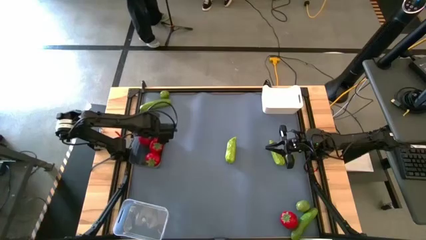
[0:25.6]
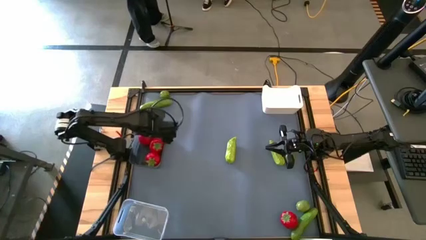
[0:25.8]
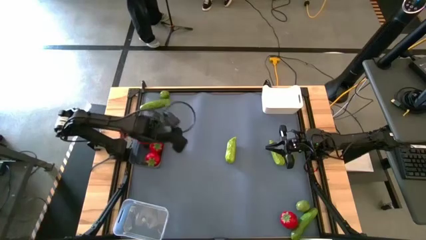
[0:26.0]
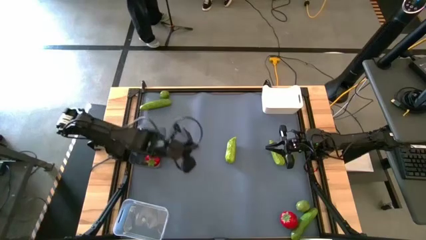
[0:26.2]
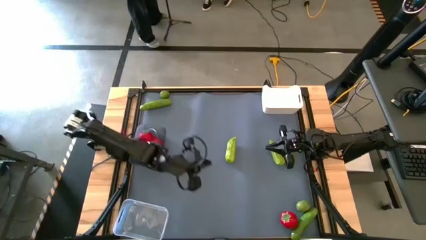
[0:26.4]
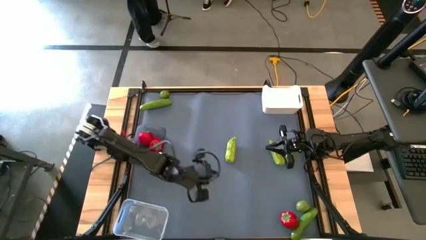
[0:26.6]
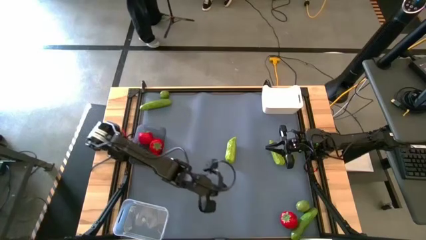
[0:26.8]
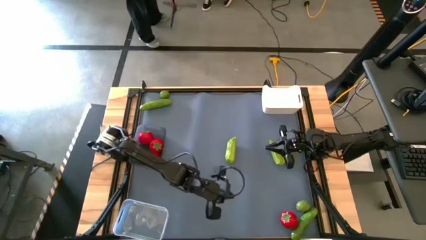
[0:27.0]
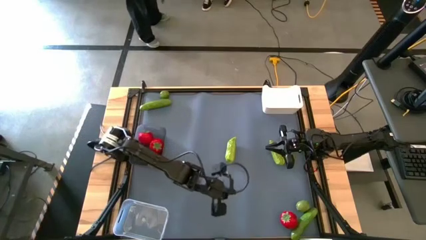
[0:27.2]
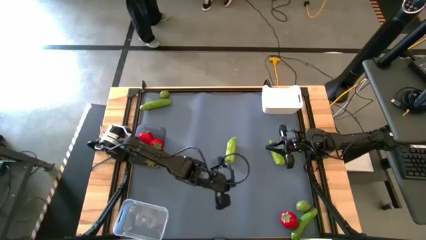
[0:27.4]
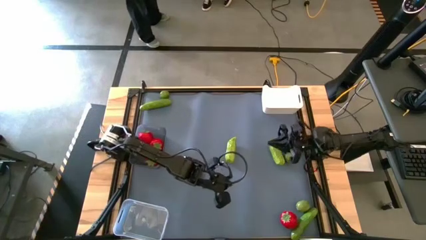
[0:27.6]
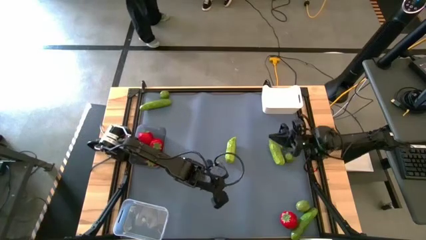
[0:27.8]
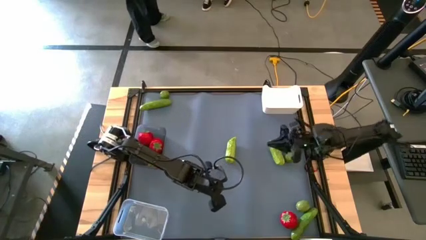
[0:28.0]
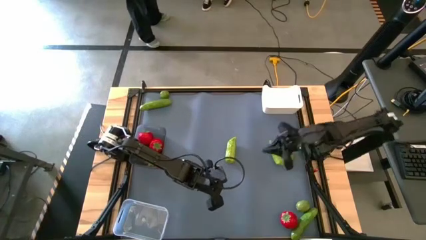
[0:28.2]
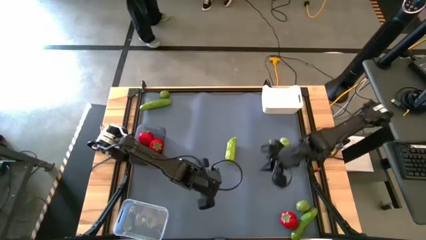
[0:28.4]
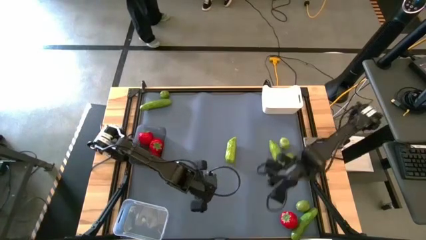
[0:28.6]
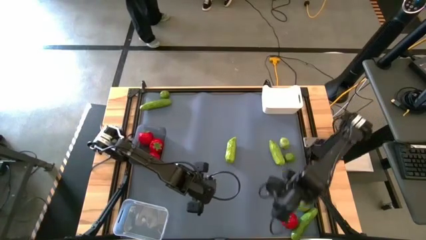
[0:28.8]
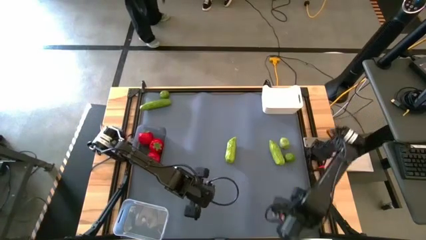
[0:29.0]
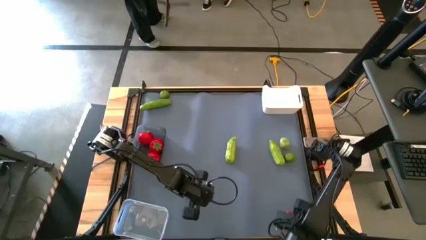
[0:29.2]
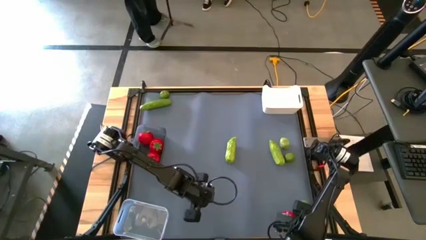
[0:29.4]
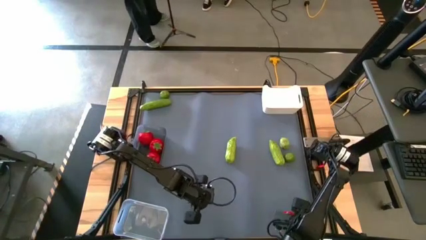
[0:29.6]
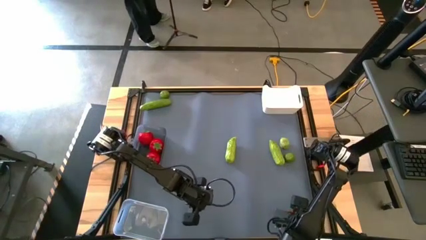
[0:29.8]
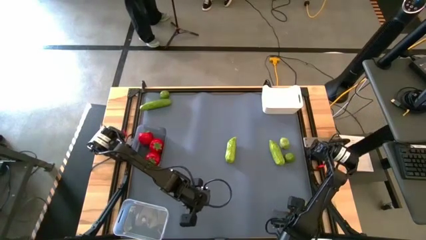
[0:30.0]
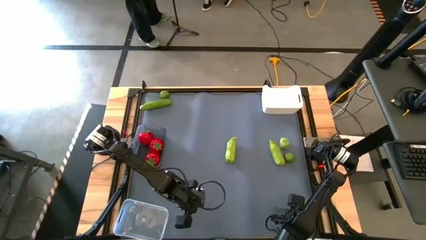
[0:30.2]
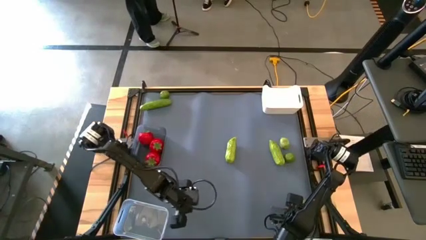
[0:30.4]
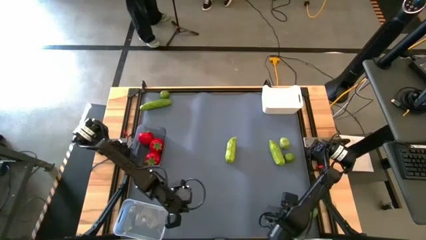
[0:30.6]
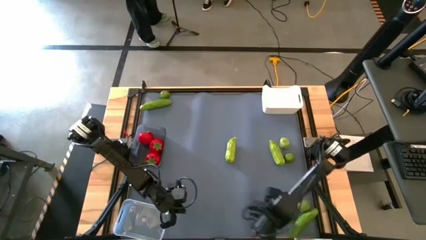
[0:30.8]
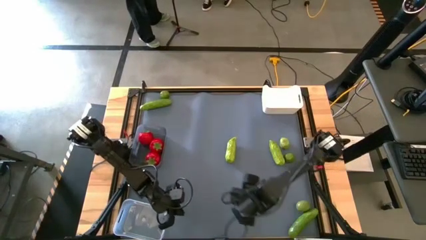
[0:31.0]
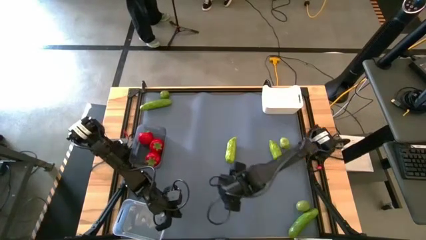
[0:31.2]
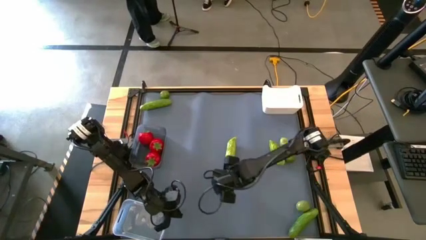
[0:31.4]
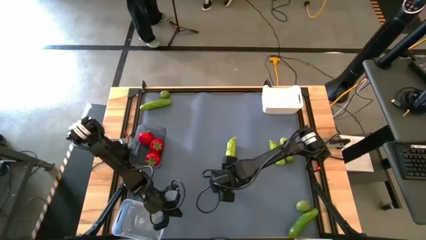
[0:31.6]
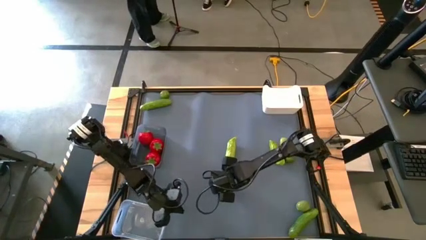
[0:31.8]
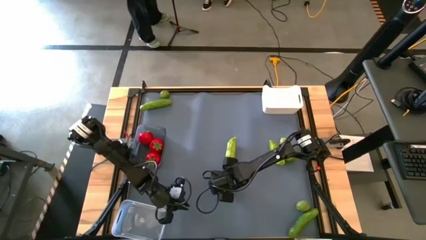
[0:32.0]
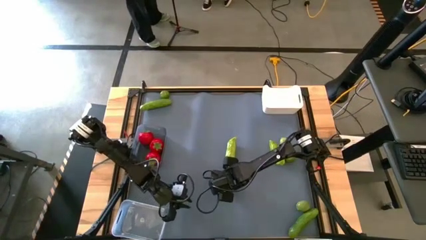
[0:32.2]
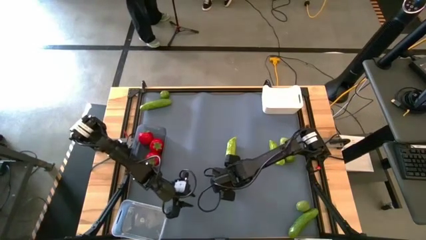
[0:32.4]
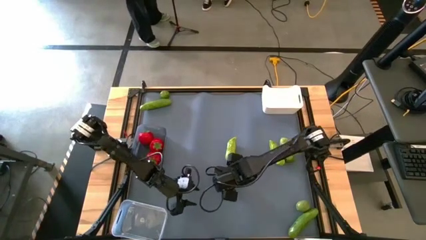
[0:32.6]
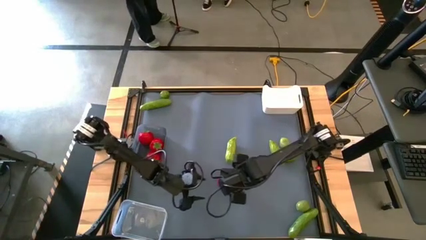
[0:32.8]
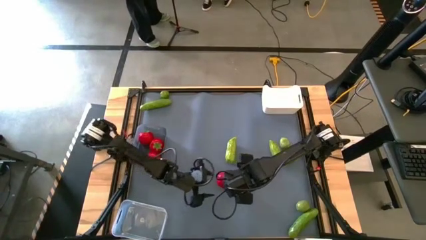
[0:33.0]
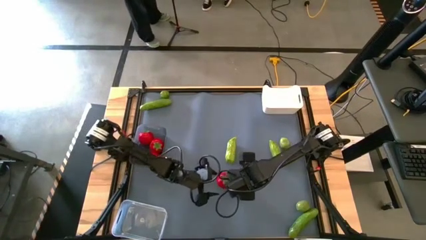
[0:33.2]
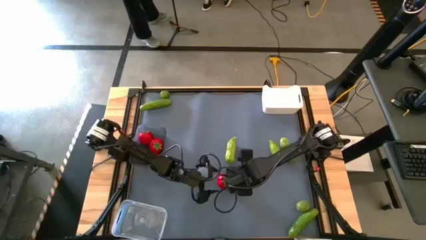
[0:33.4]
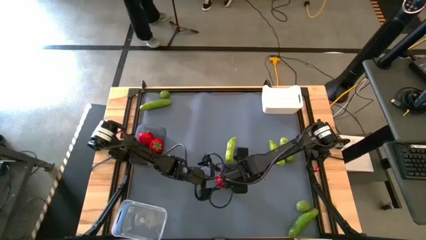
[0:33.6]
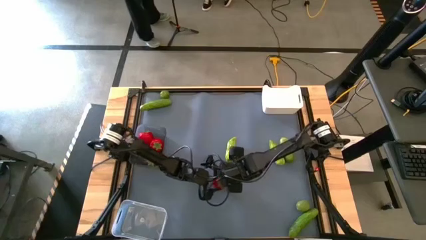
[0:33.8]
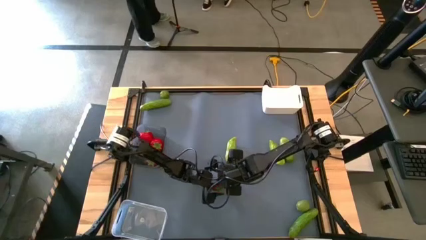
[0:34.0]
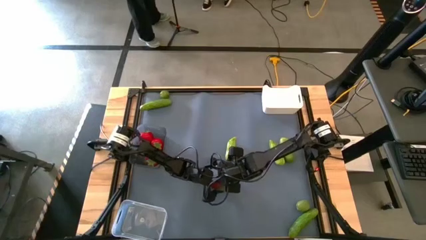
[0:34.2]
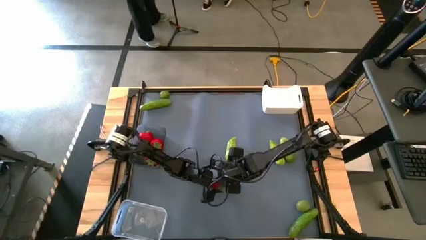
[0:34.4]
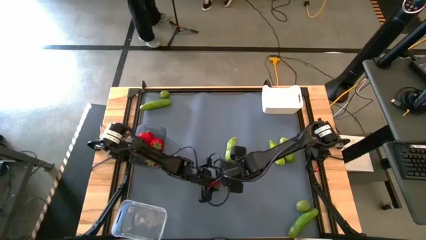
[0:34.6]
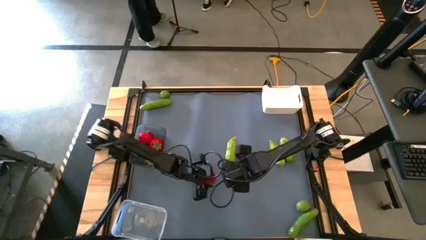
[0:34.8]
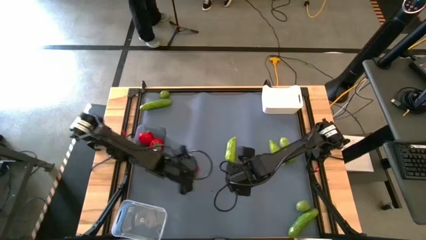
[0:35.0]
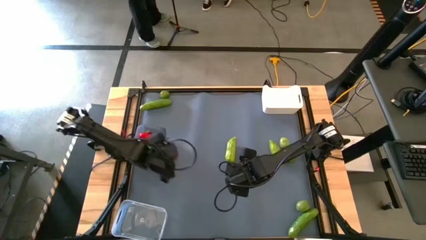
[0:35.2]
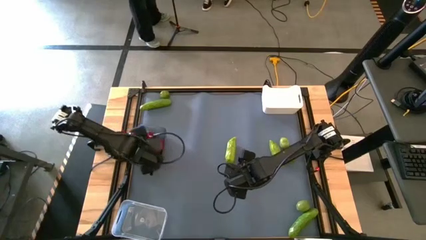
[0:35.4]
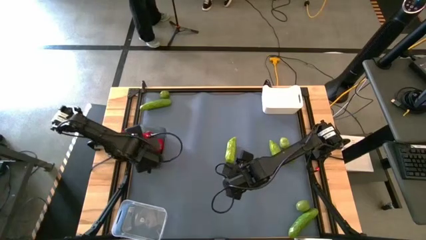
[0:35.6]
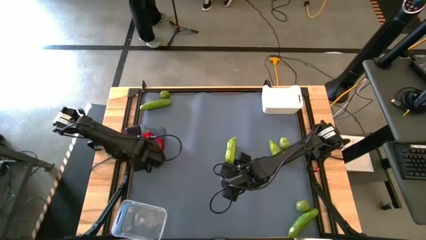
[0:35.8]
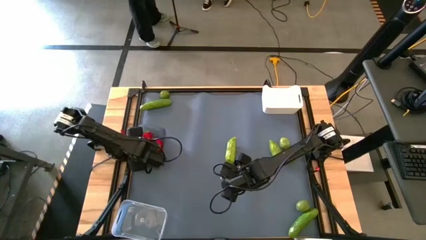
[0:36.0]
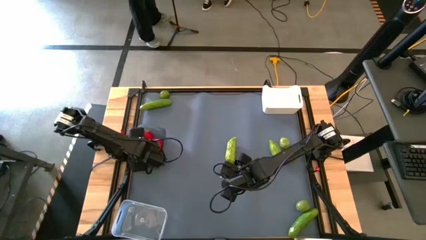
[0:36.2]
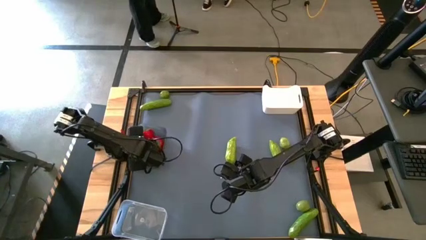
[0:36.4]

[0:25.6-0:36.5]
Task: Sort produce into baskets
Put the tomato into the black transparent bin

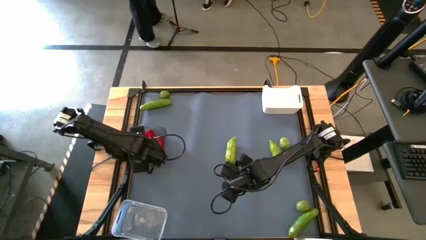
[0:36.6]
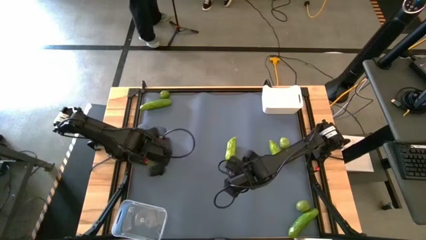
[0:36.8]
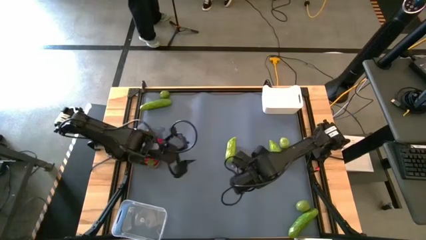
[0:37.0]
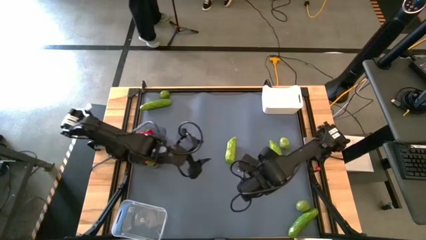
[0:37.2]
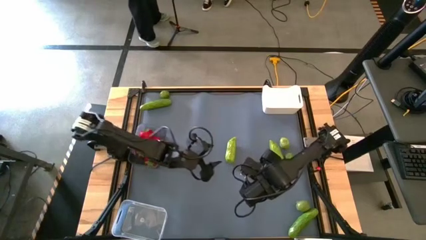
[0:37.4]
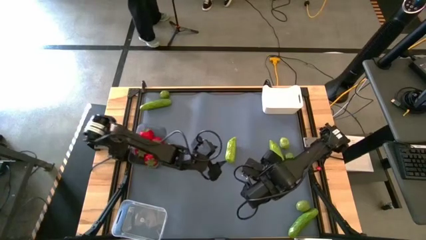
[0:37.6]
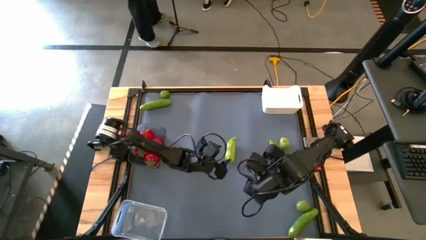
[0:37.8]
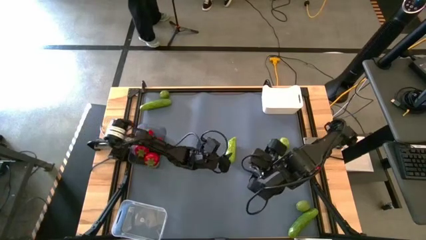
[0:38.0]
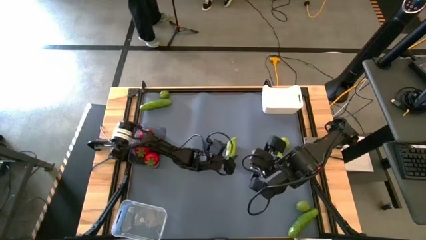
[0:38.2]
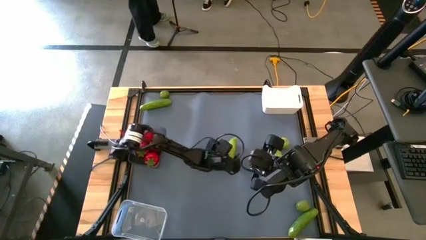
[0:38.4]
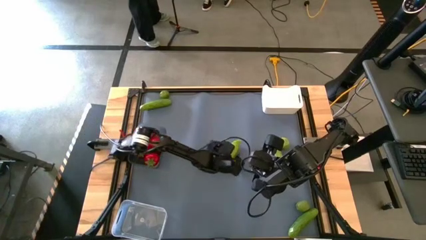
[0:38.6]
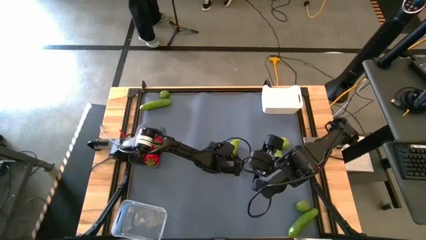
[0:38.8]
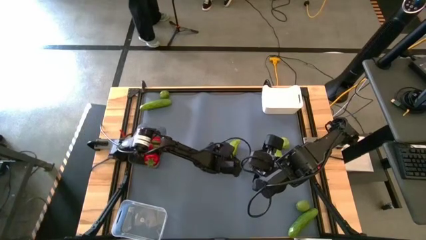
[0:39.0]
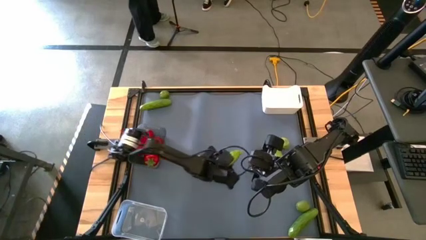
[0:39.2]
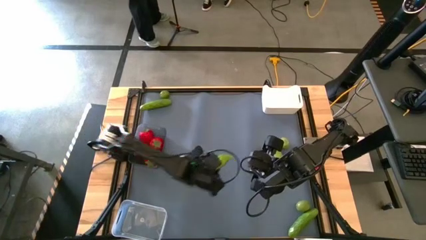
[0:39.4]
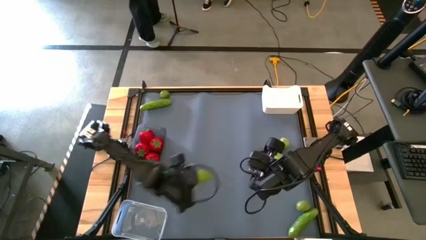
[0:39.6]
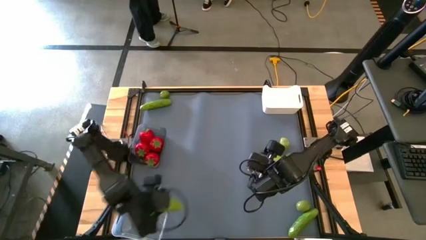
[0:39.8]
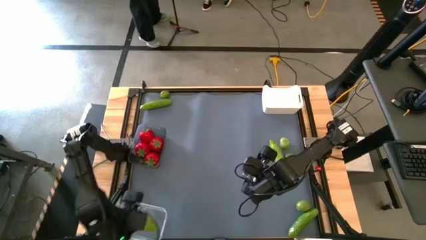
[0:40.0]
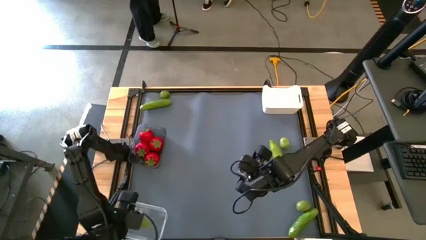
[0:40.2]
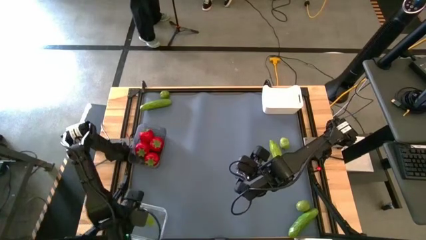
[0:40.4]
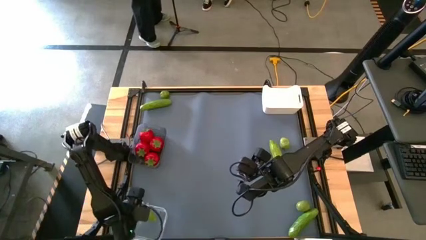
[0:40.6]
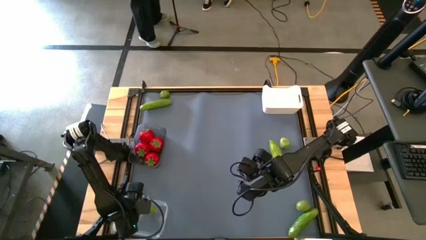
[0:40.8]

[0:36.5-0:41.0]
Put the center pickle into the transparent bin
